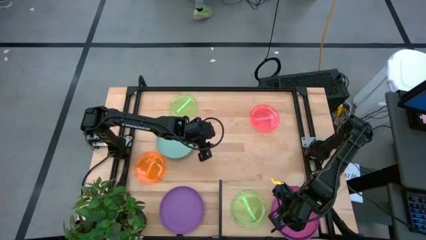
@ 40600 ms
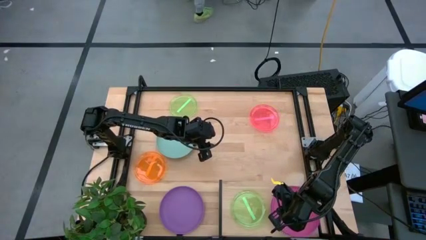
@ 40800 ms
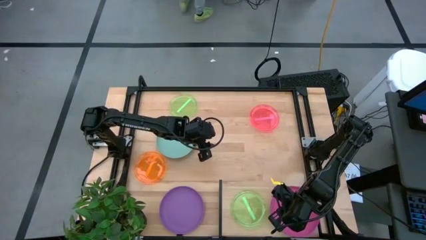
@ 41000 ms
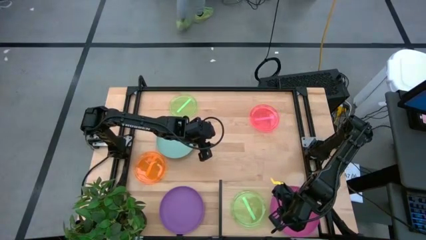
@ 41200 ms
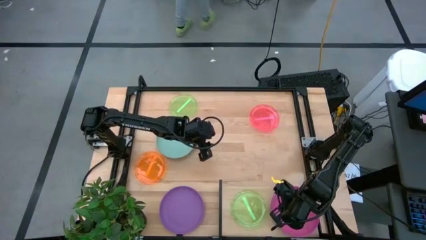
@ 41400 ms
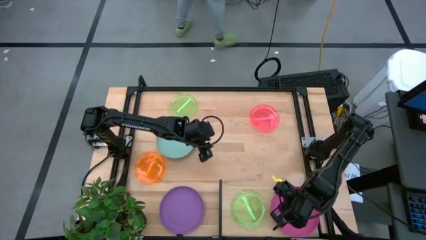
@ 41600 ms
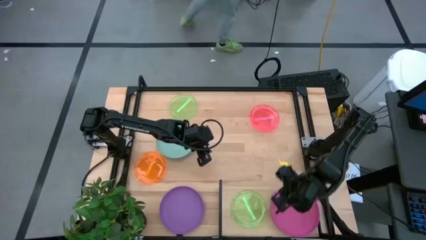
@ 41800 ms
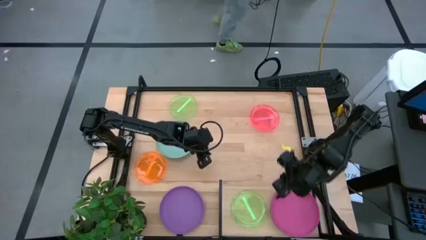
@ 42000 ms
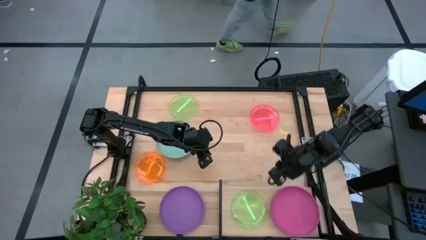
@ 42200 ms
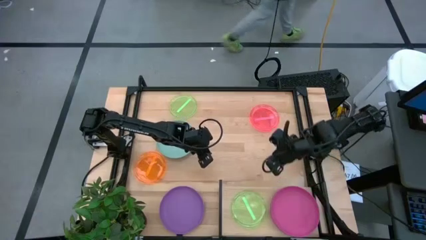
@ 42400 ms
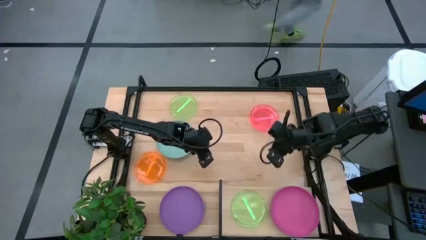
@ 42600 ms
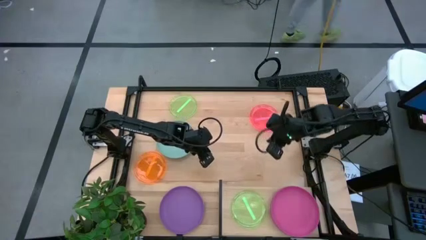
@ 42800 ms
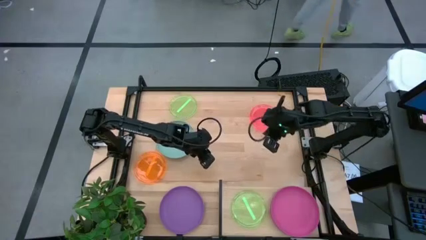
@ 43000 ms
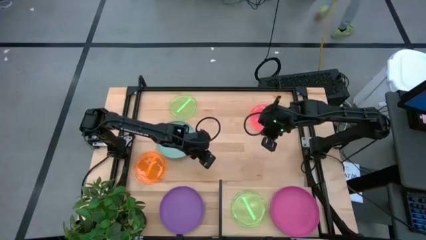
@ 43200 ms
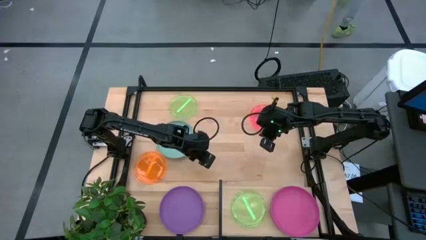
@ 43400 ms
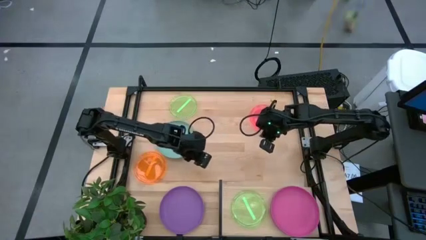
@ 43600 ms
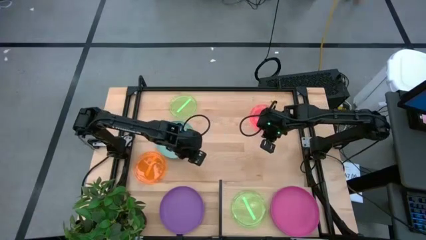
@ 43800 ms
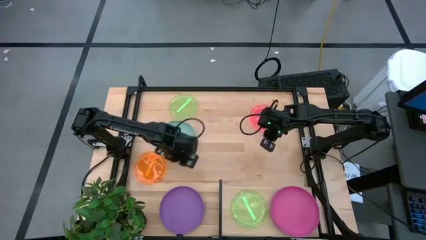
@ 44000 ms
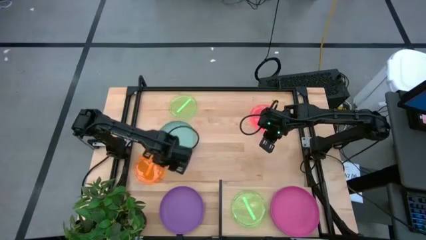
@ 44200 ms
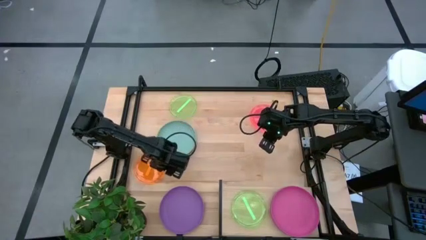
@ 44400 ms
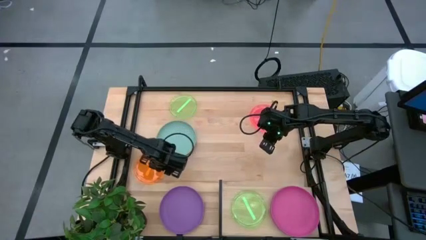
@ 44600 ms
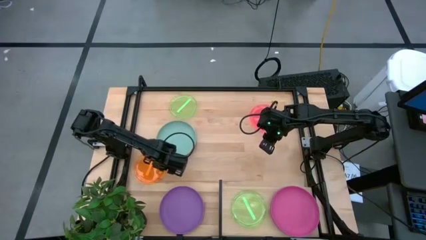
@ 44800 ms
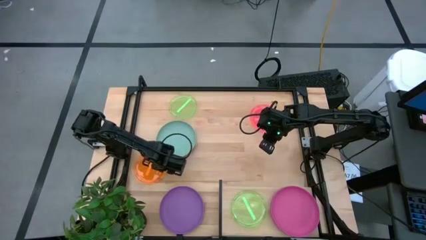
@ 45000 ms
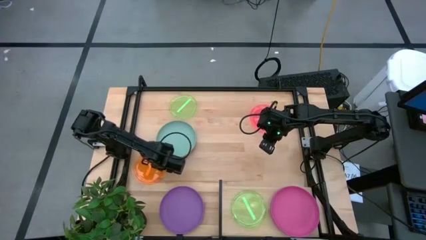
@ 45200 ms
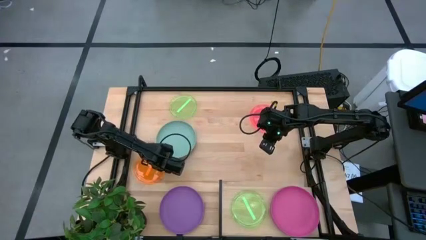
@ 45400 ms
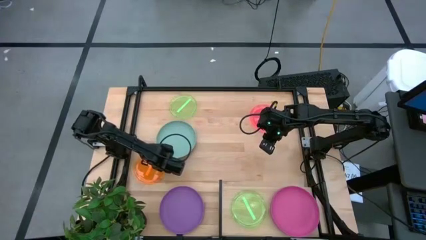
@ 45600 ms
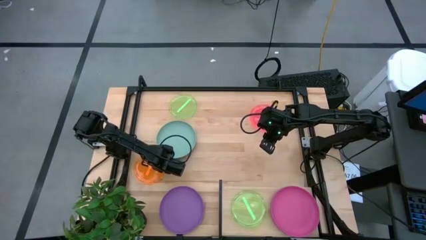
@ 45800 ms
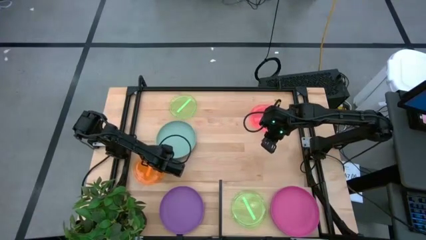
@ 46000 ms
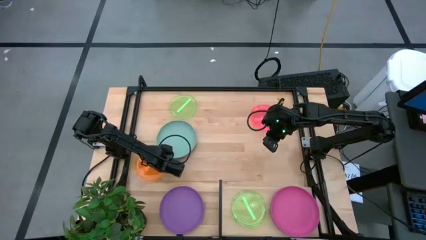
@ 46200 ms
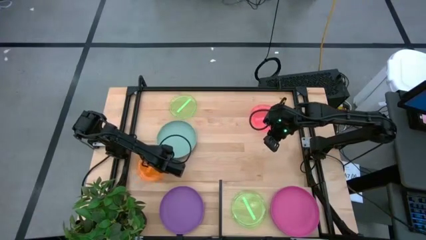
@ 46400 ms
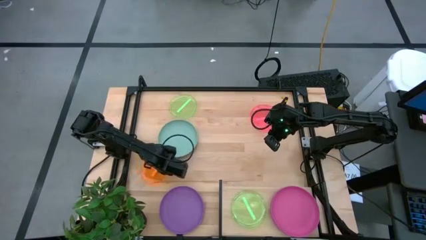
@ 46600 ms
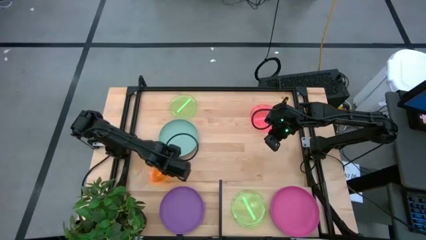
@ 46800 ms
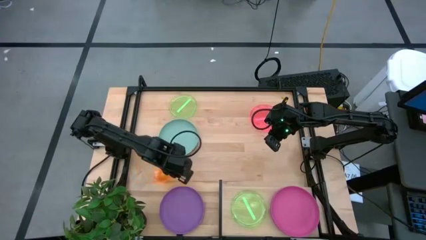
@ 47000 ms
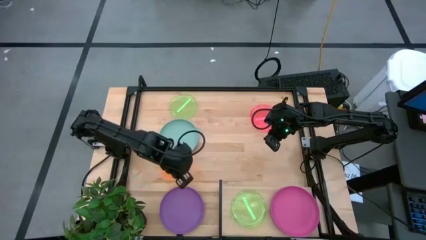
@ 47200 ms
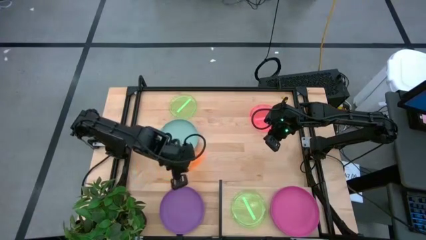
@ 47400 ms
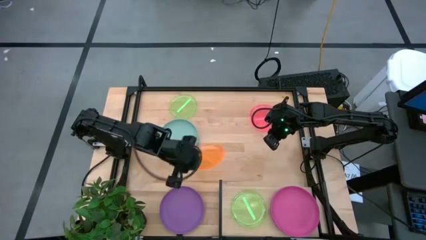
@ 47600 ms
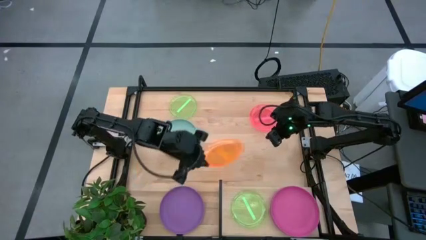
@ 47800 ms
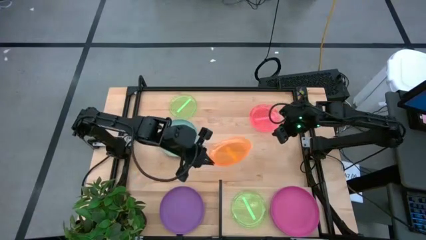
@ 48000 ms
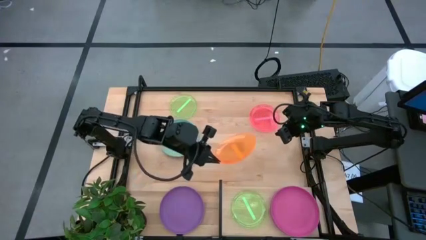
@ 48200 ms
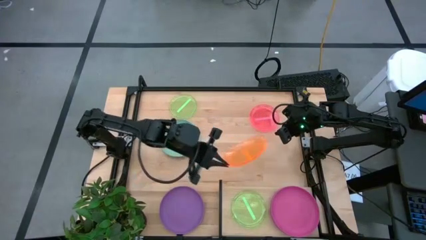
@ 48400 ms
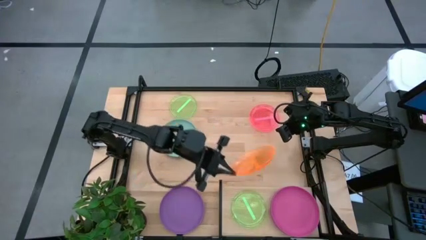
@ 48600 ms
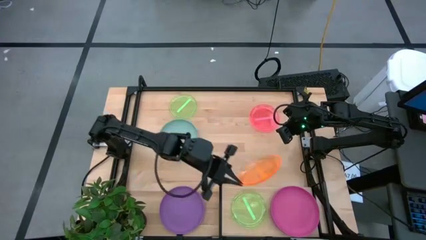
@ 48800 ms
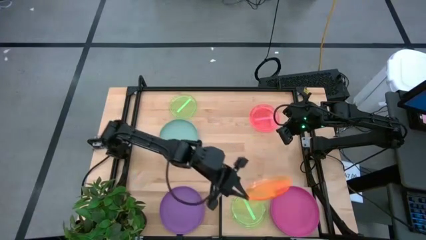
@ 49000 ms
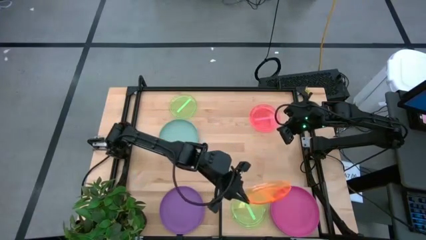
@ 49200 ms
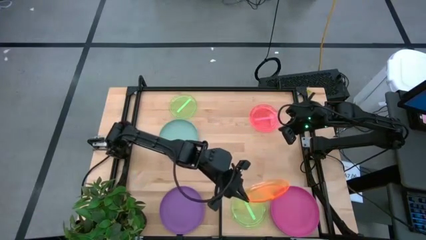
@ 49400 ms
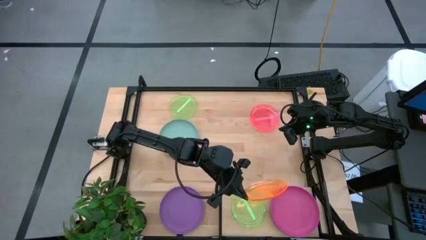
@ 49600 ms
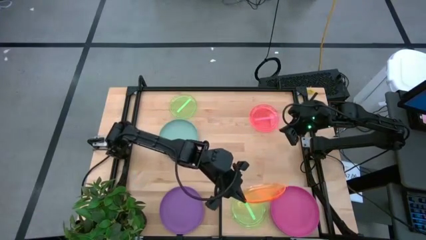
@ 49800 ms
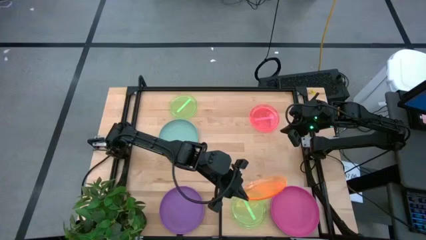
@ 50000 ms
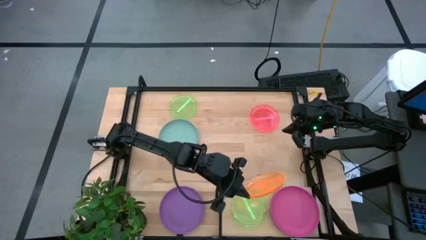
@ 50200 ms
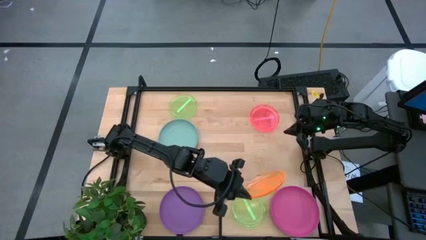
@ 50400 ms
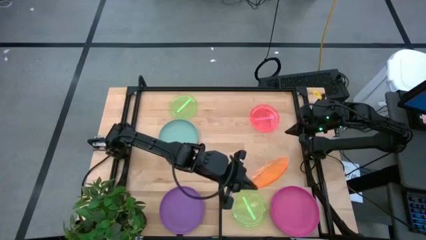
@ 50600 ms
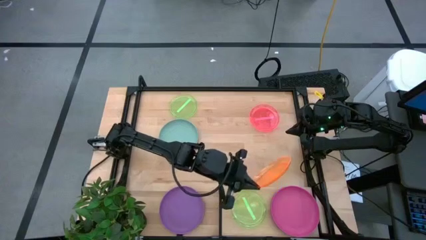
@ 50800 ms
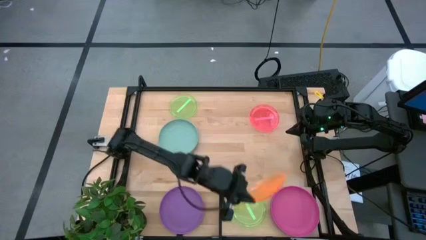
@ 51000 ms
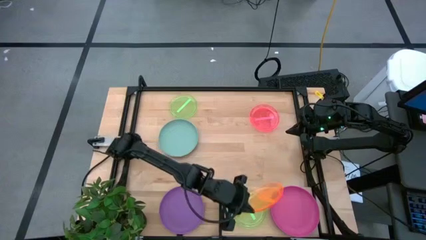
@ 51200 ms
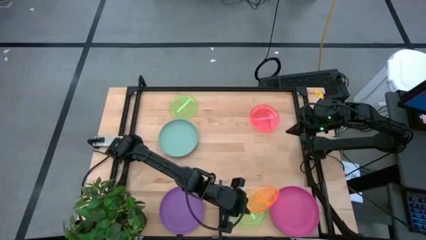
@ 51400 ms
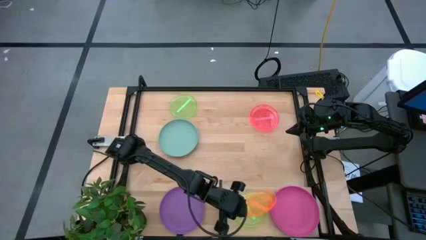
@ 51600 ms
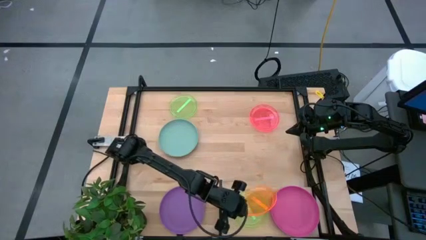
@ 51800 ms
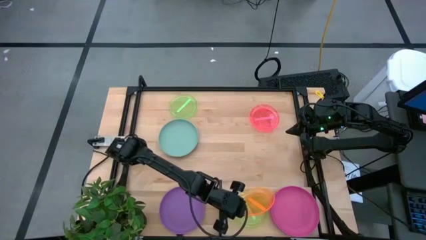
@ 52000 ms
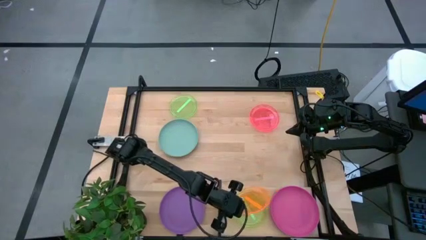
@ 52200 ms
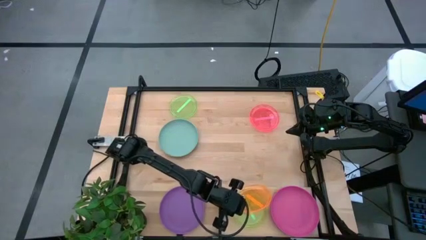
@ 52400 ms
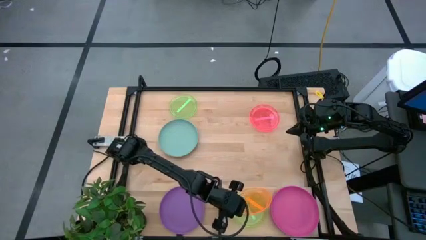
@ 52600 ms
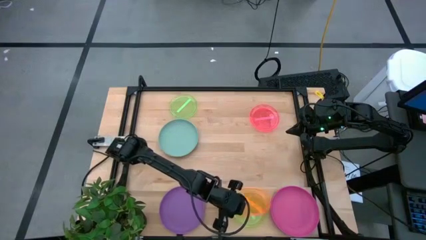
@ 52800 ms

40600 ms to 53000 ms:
Task: Place and stack plates onto a shelf
Stack the orange plate on top of the green plate on the shelf

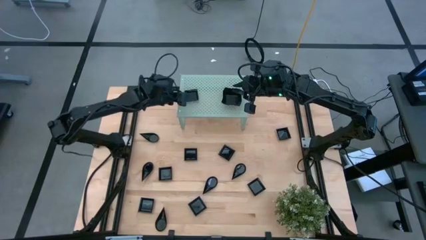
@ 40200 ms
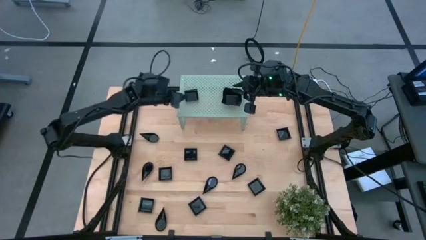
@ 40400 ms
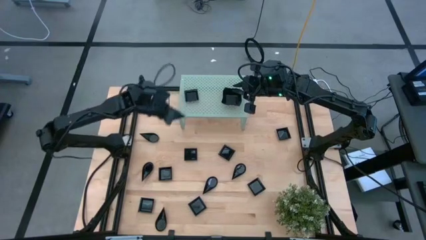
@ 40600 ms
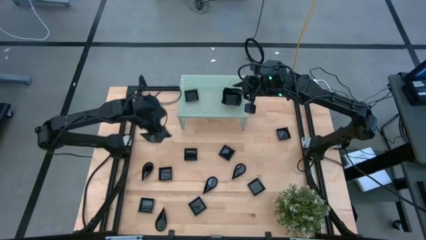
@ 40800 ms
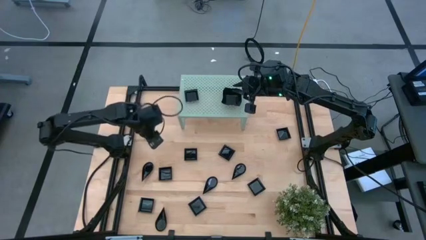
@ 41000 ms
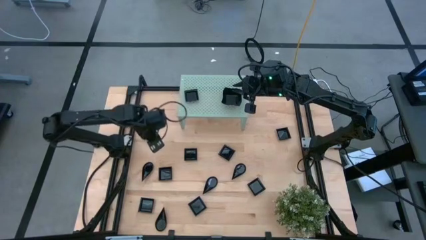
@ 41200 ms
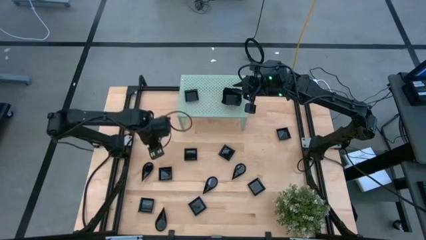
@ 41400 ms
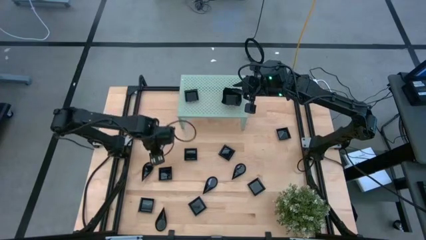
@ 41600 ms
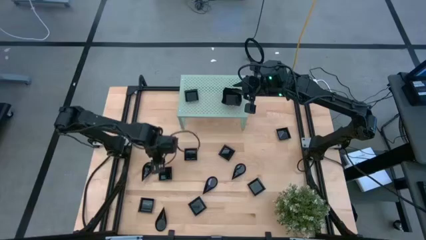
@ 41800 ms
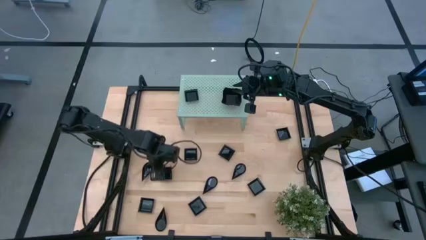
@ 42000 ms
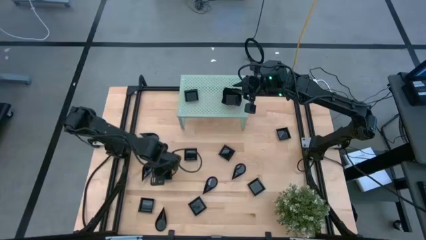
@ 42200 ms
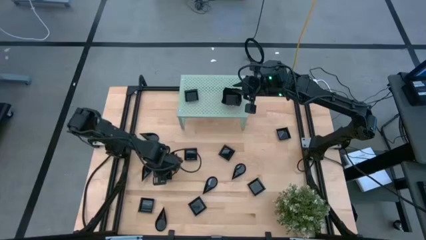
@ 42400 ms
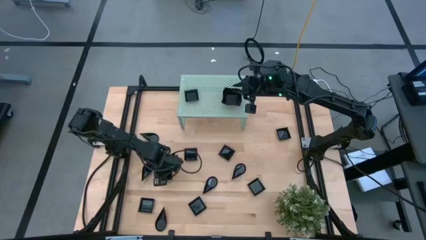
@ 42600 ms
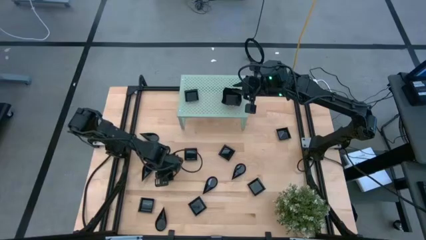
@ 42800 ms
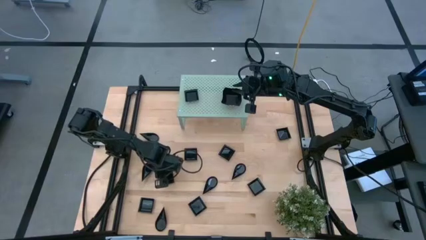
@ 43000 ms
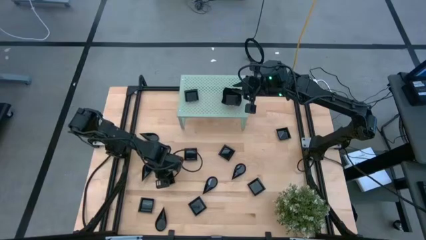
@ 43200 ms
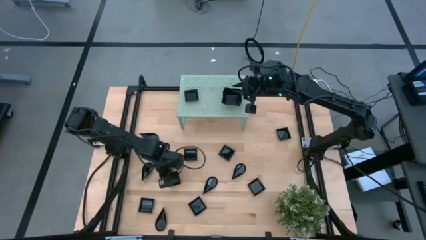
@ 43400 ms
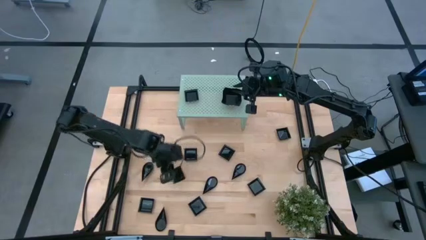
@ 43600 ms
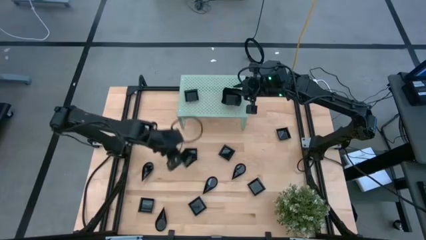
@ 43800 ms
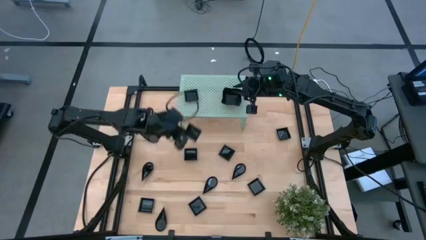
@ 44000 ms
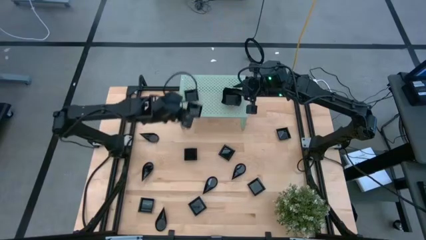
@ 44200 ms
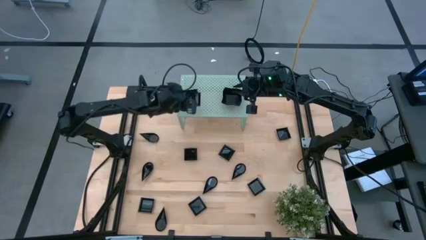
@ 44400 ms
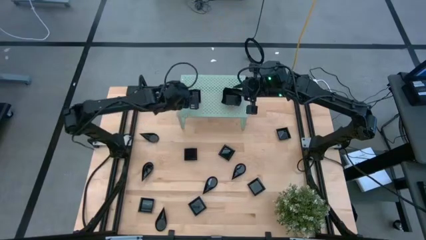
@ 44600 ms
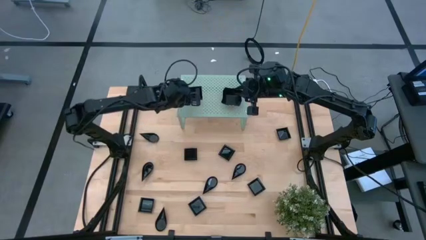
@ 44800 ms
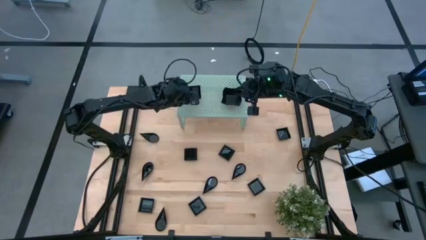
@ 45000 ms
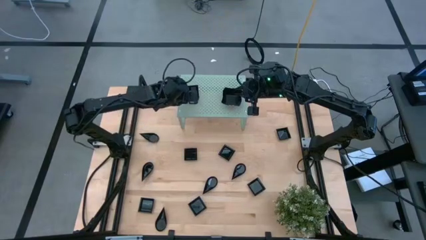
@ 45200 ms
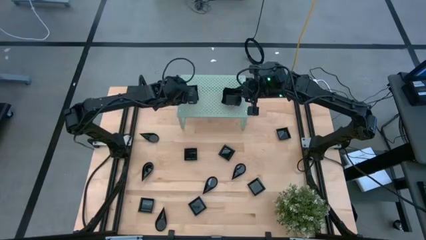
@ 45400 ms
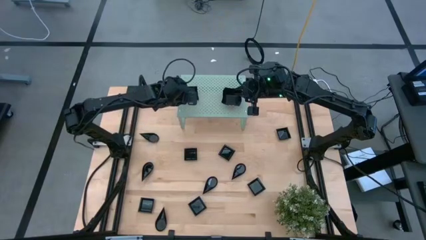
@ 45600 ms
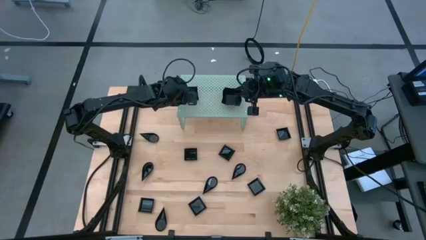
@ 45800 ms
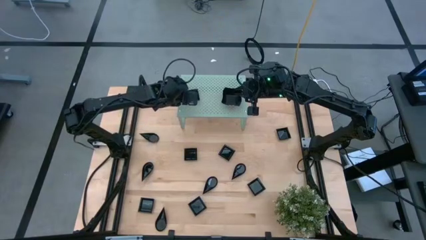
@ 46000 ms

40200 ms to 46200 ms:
Task: Pick & Place Mini shaped plates
Stack the black square plate on top of the other black square plate on the shelf
